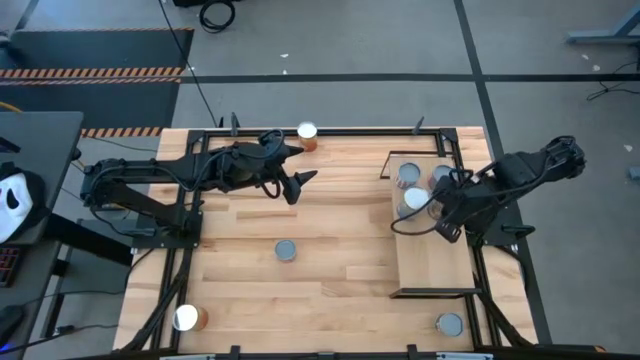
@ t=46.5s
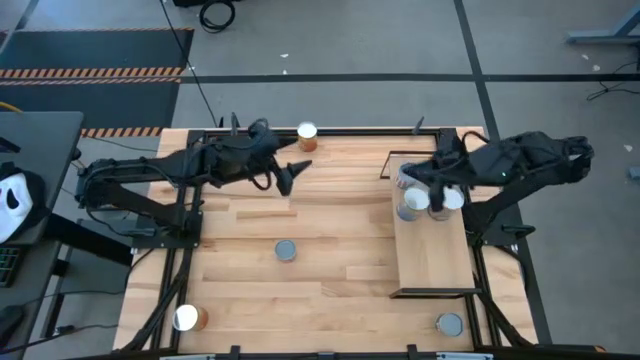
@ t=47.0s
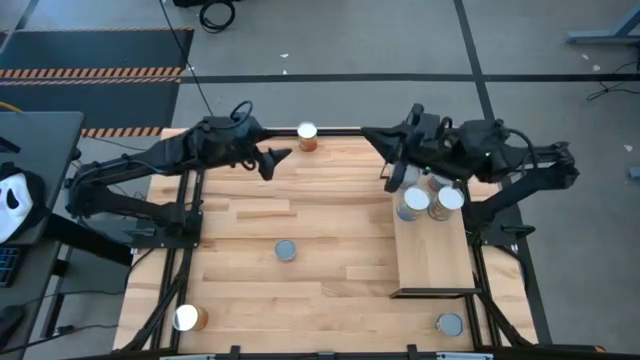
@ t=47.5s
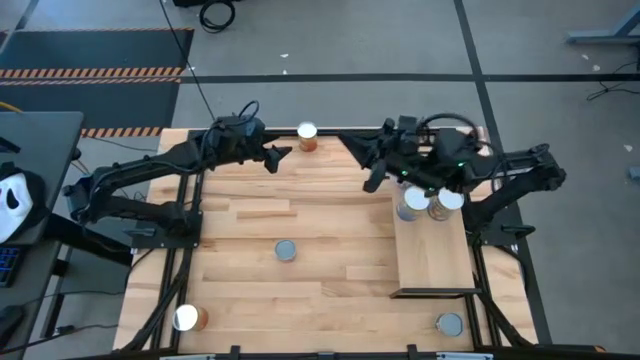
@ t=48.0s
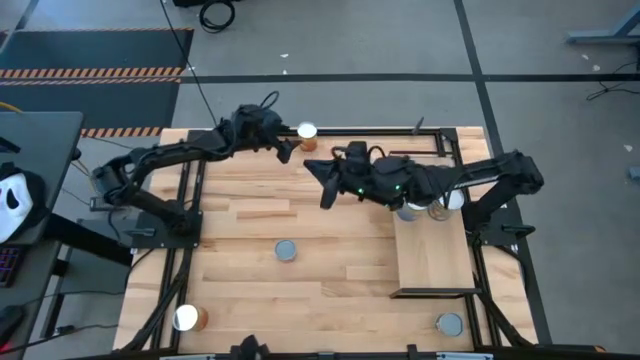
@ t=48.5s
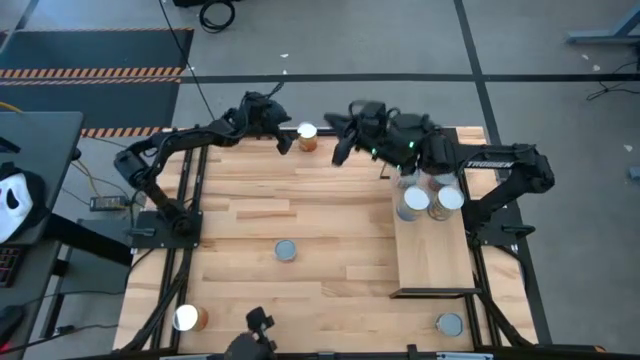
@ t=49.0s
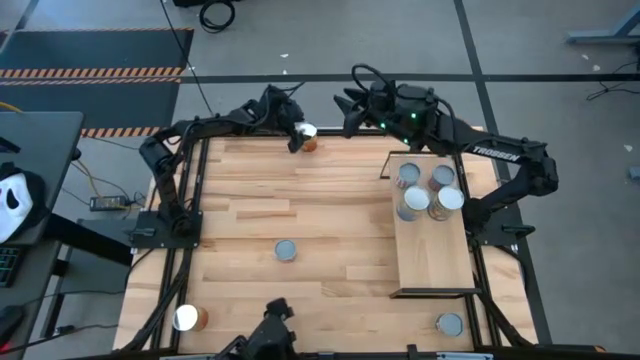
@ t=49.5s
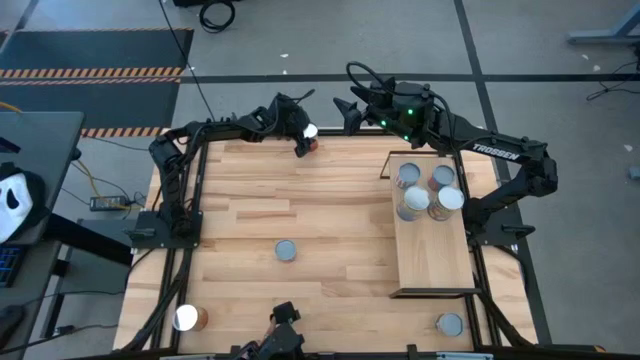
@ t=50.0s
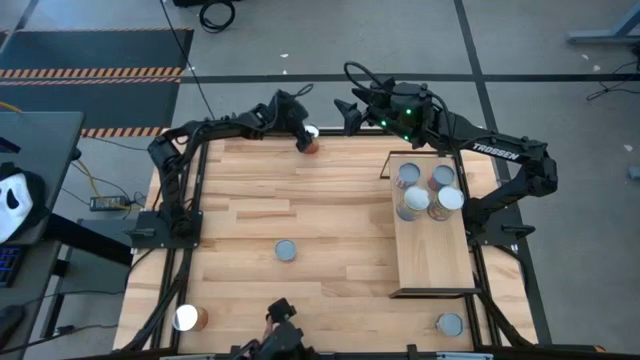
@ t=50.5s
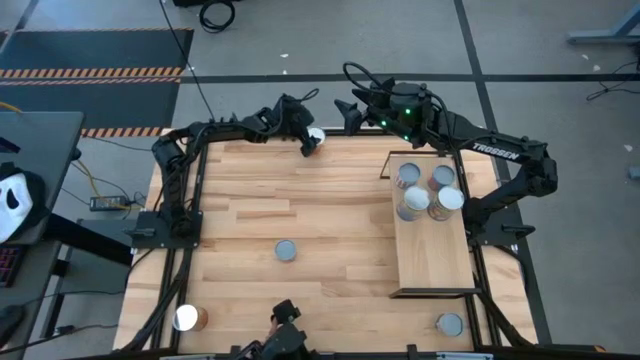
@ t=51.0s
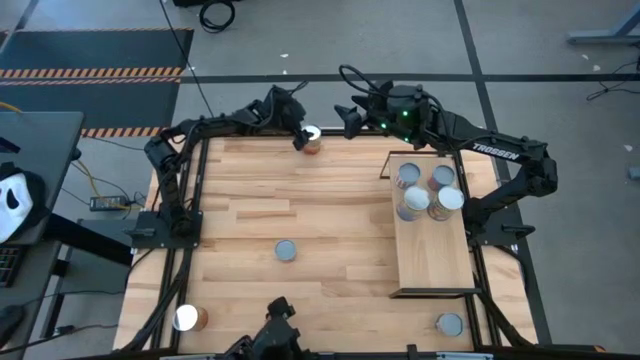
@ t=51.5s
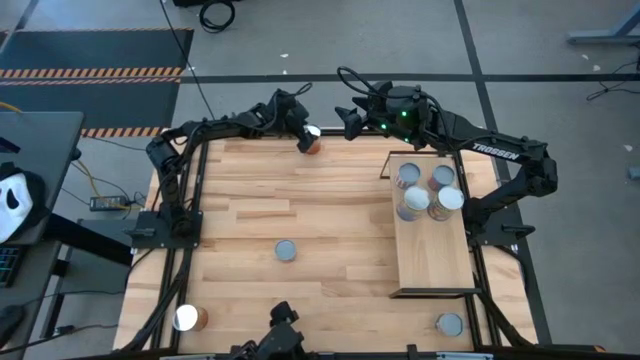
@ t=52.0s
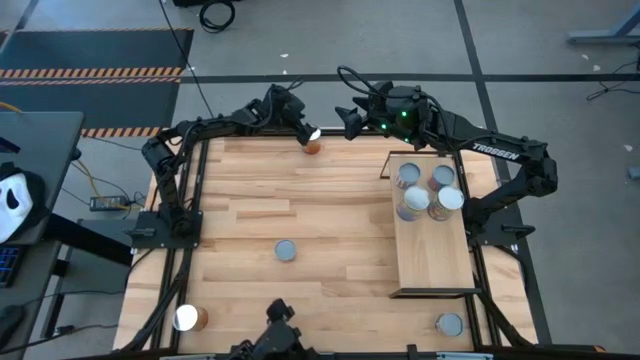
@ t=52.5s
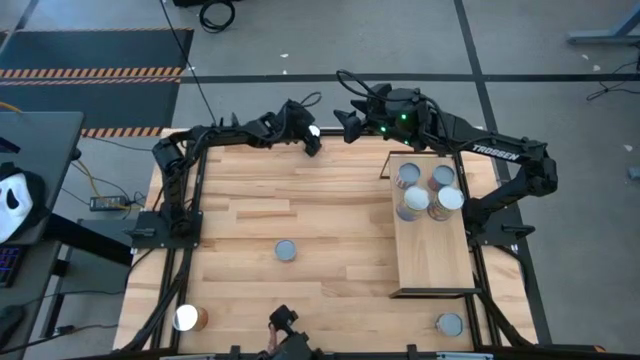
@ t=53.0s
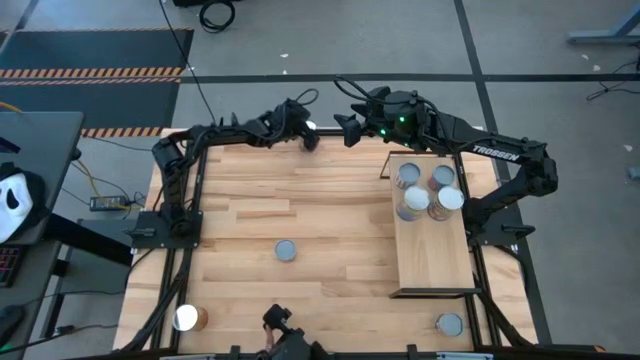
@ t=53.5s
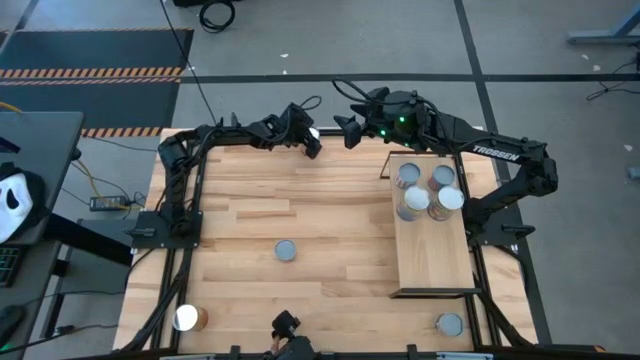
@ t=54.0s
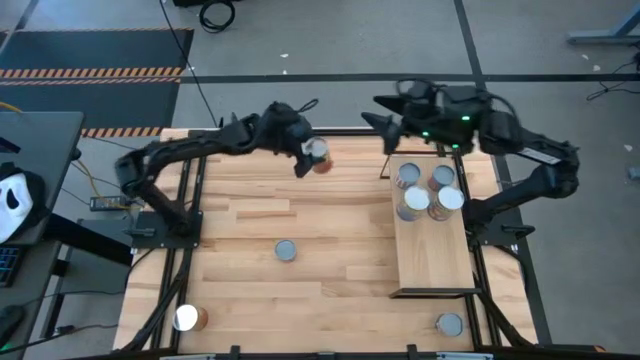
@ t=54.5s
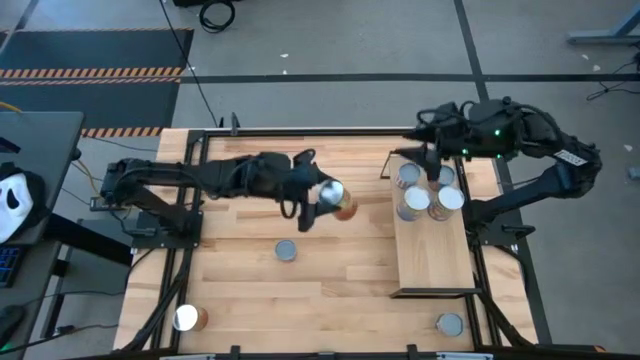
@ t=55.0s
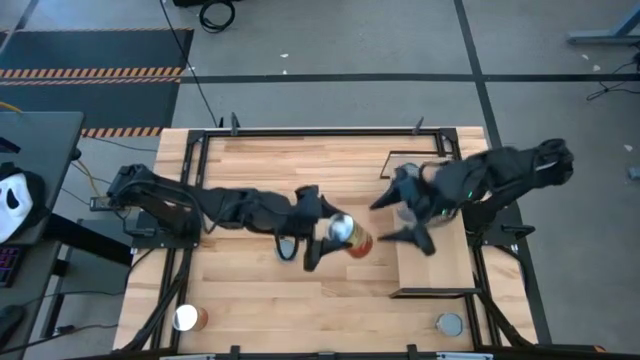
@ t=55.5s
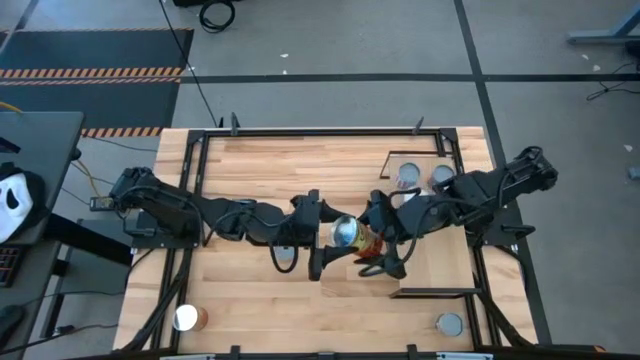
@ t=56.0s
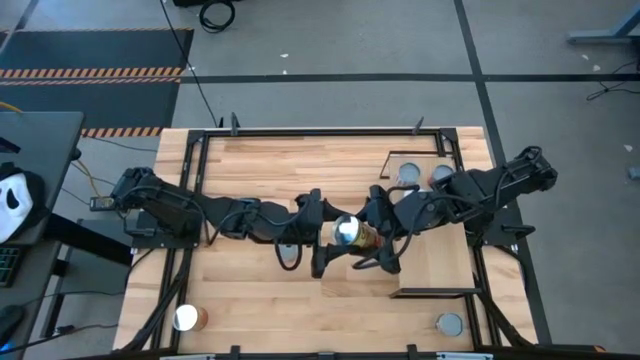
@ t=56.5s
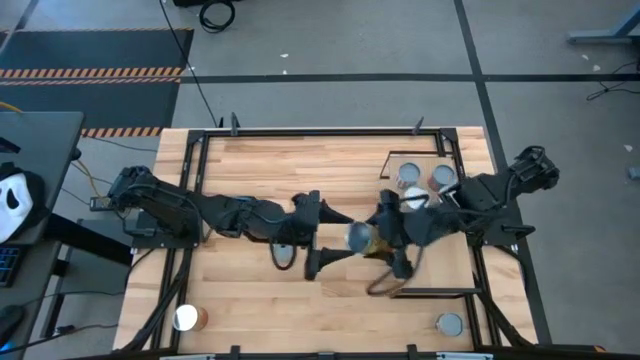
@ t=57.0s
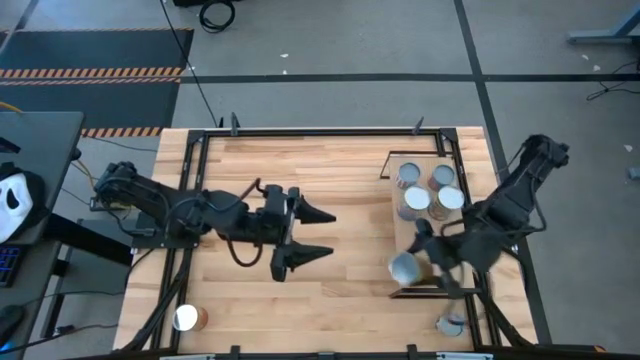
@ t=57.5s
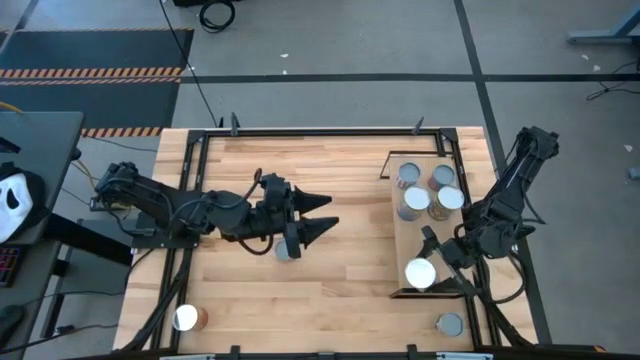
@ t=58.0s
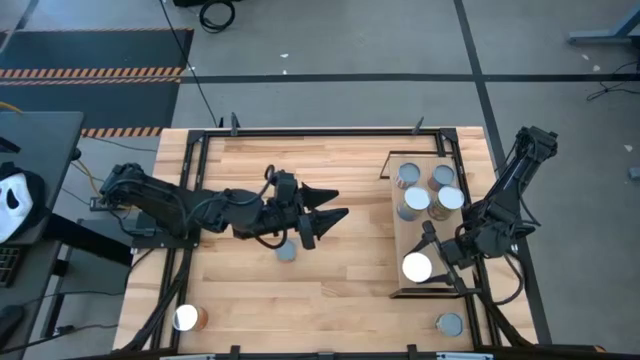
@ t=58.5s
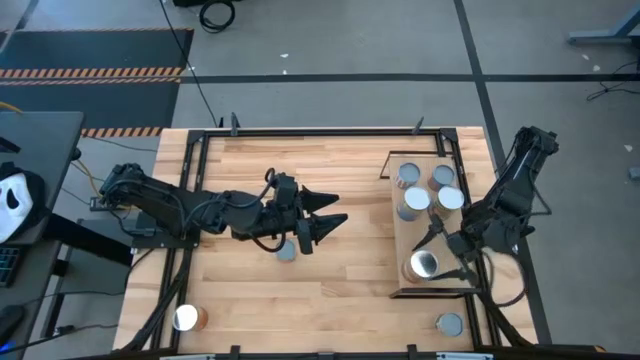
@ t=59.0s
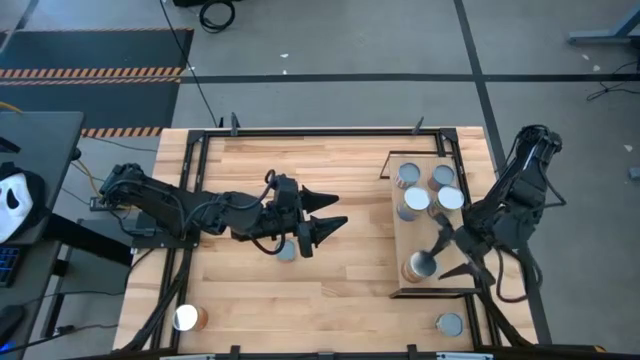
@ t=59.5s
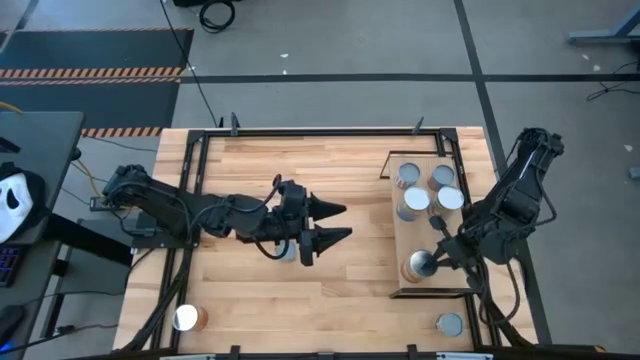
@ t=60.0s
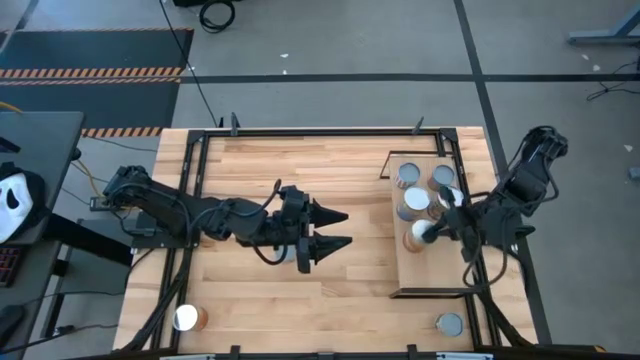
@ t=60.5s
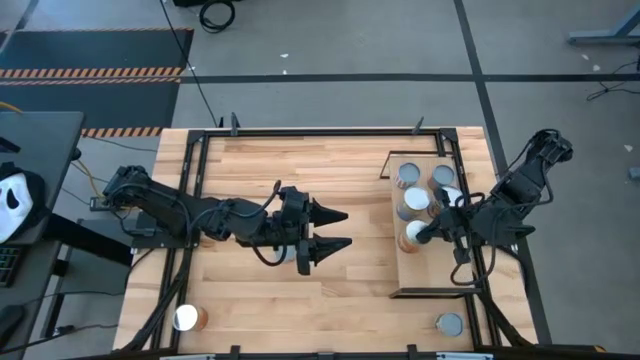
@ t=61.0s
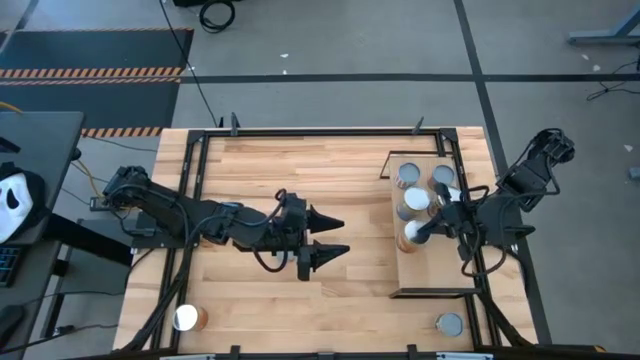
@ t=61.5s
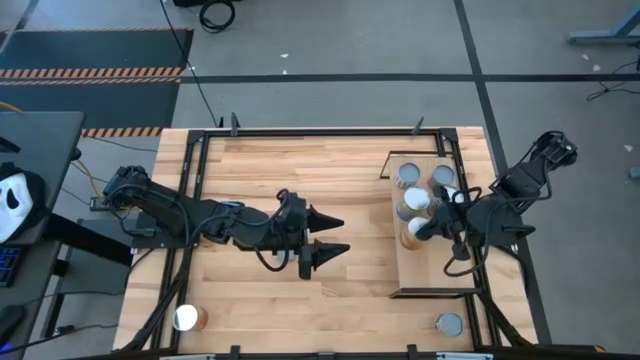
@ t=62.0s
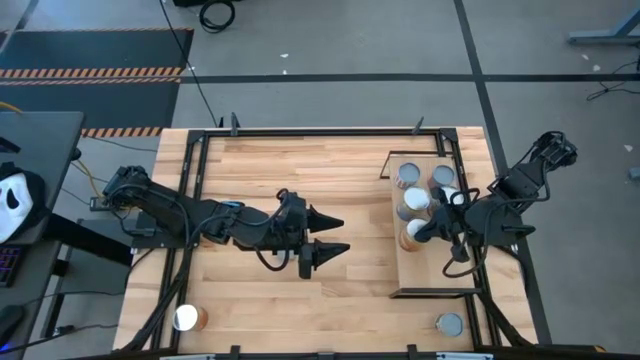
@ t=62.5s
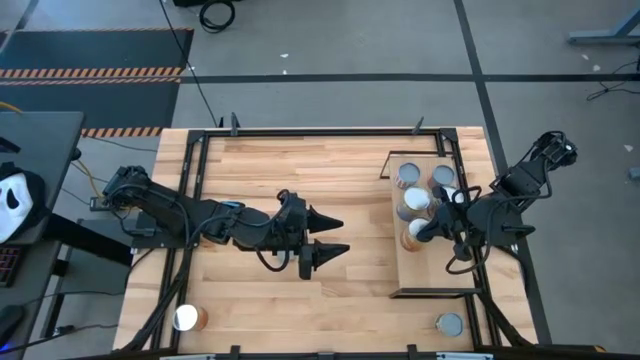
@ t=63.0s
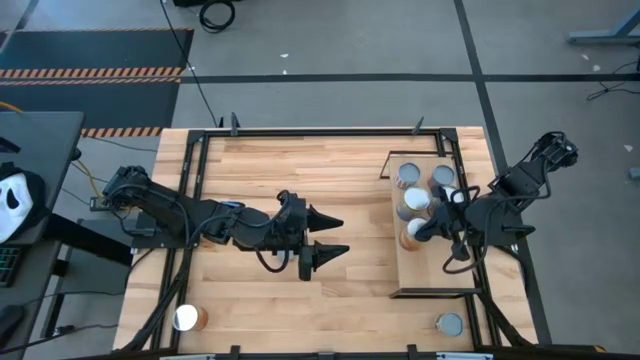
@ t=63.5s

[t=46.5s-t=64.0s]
Task: Pick and place cans onto a shelf
Put the top canned corn on the shelf

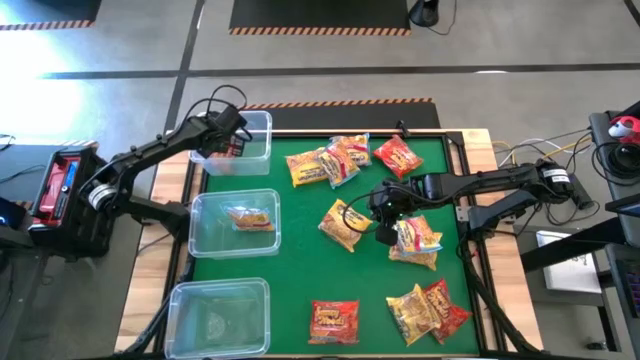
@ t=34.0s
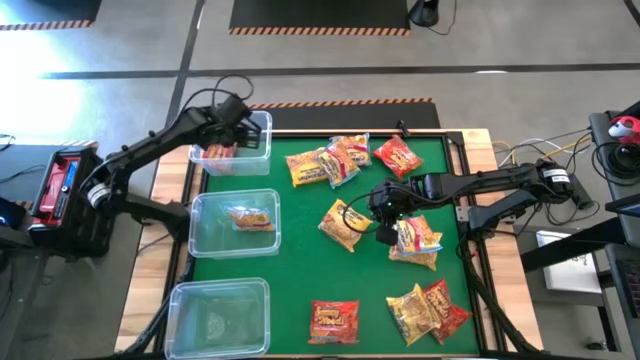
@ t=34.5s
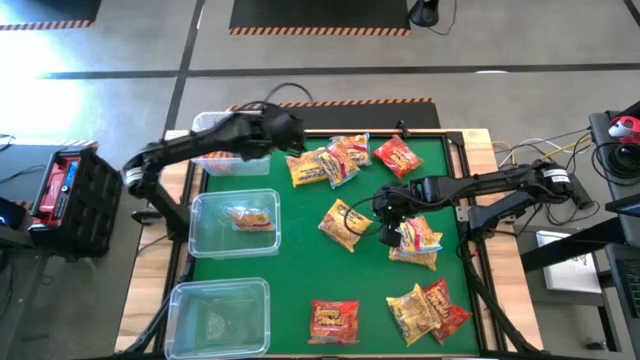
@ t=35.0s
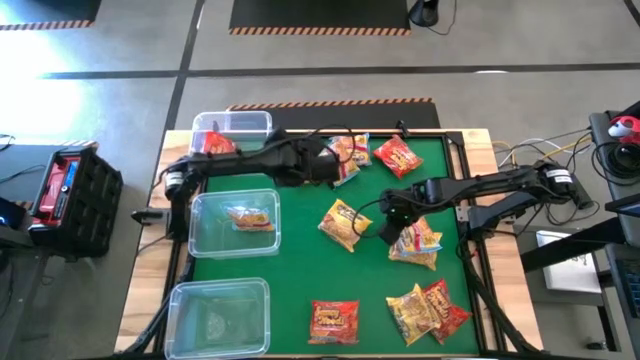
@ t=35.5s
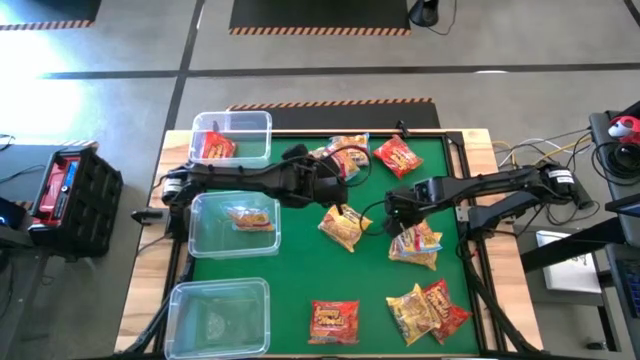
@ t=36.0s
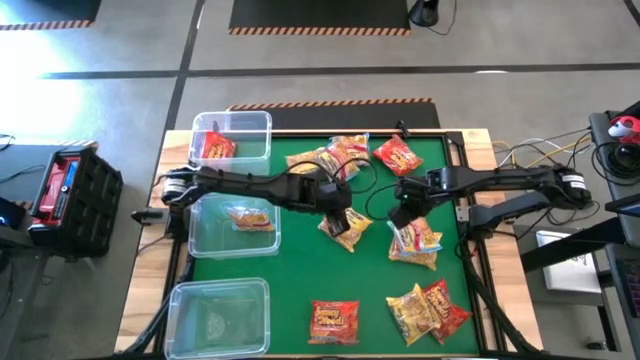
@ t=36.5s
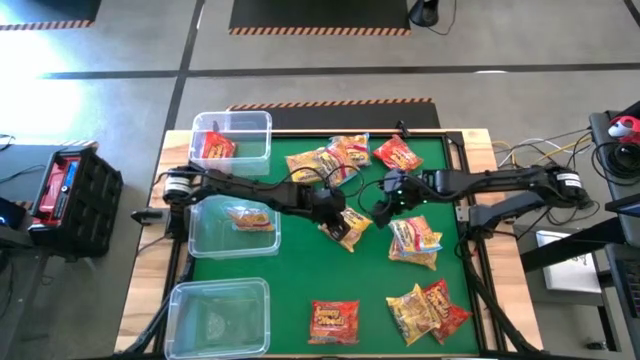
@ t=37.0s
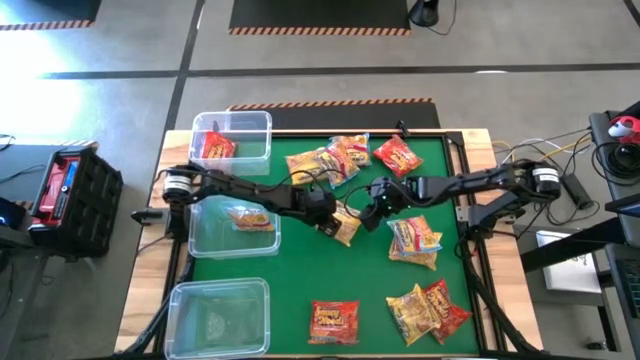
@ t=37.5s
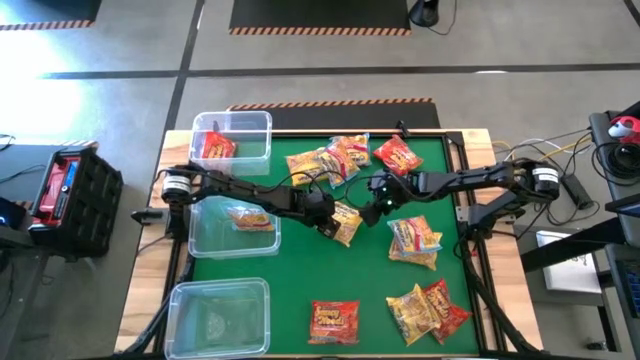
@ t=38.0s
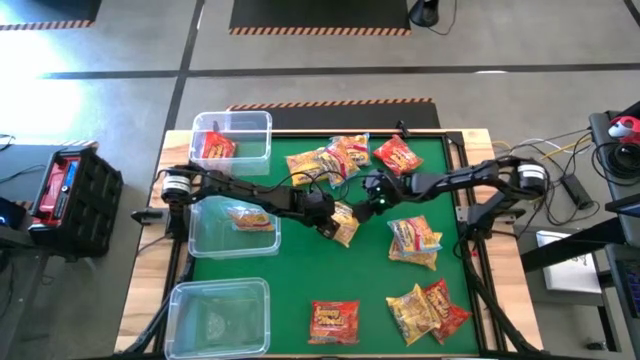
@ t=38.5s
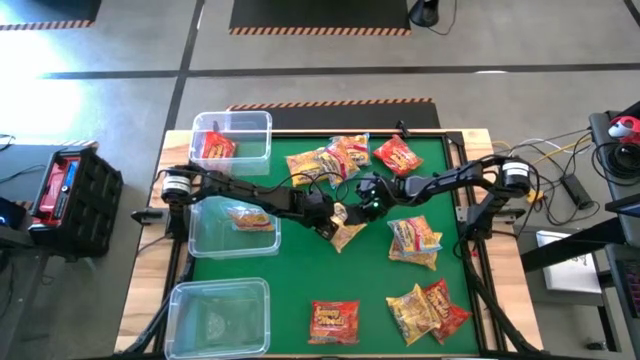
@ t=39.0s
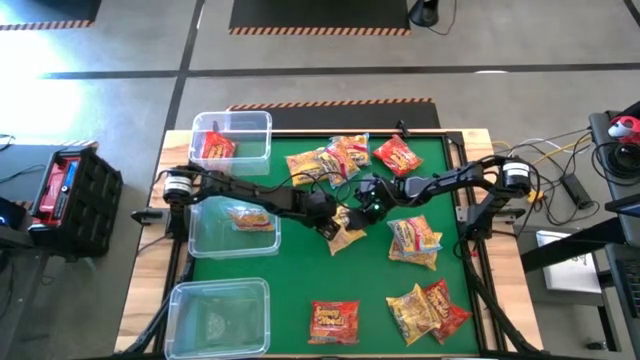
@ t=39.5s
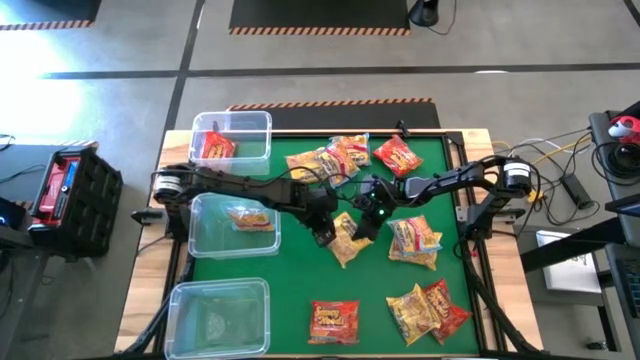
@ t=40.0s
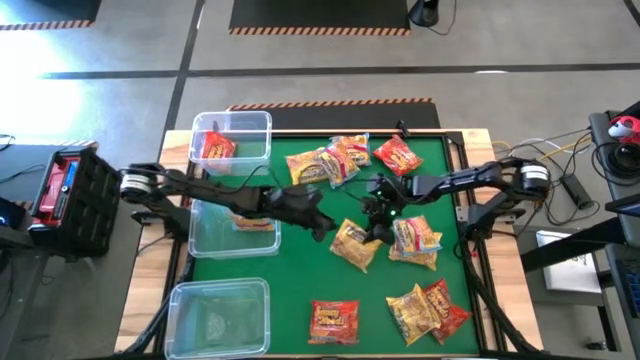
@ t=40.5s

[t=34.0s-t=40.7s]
Task: Sort Maruchan noodles
Put the middle yellow noodle pack into the bottom transparent bin
